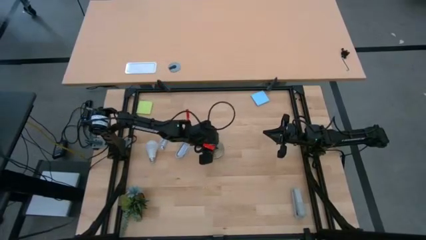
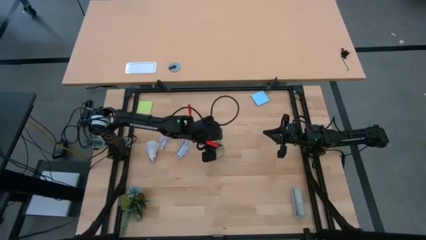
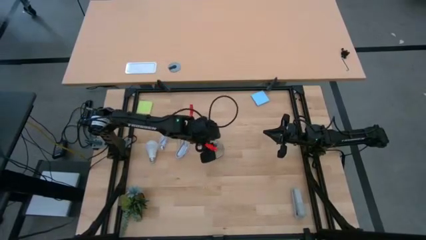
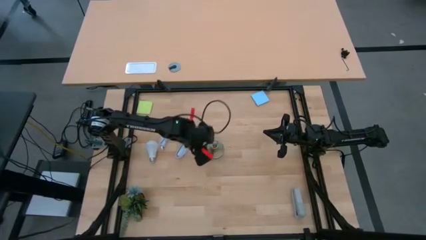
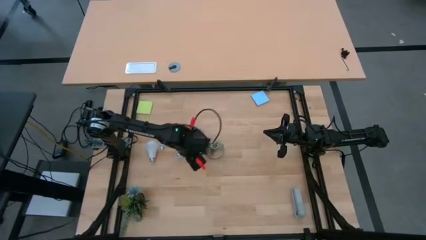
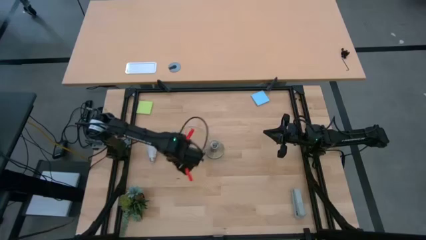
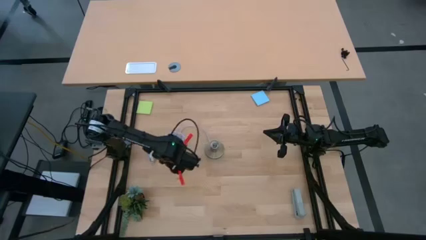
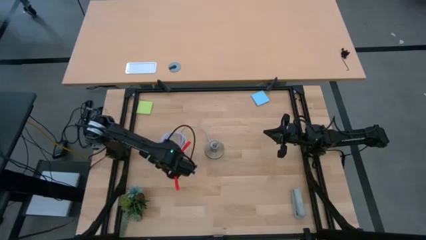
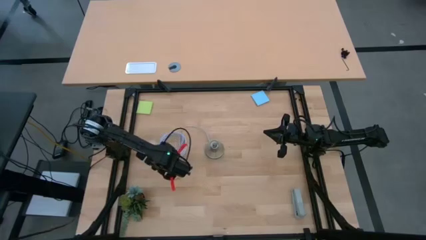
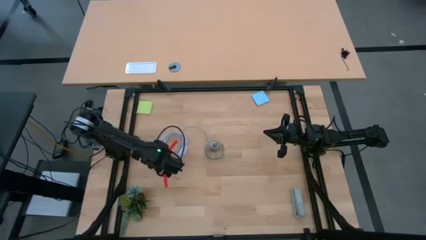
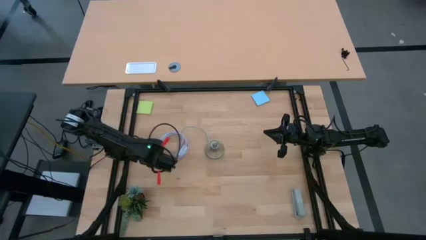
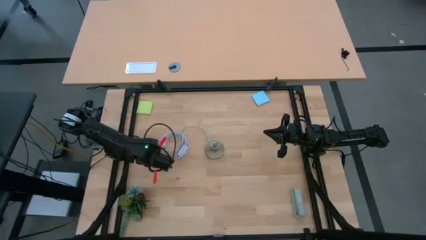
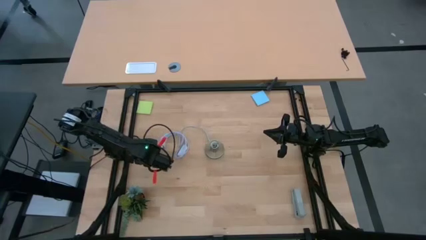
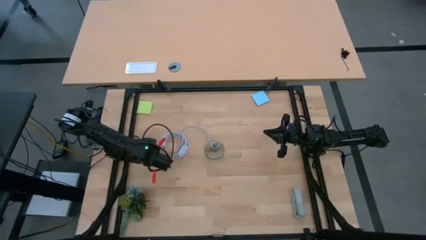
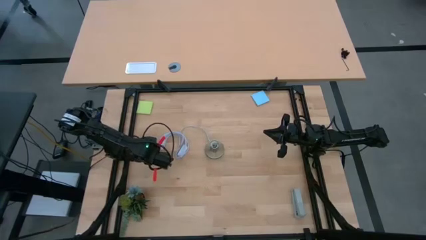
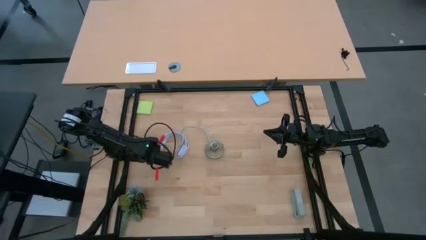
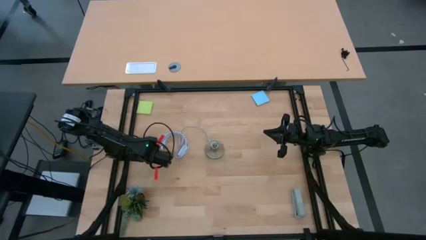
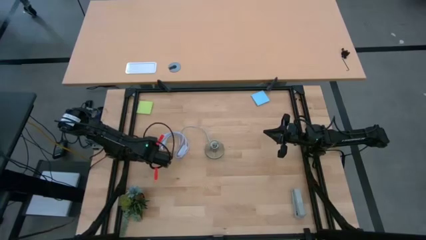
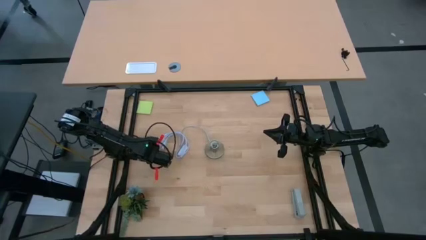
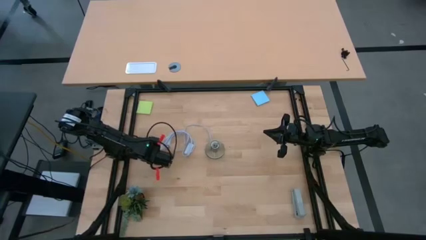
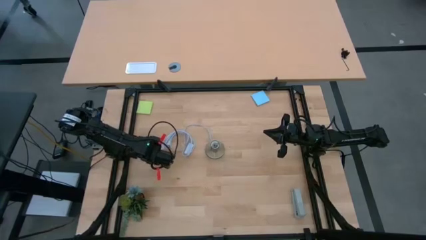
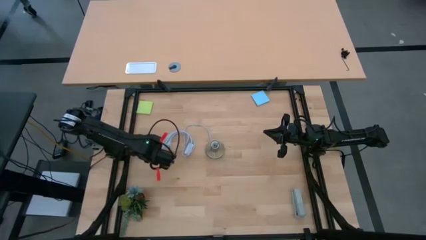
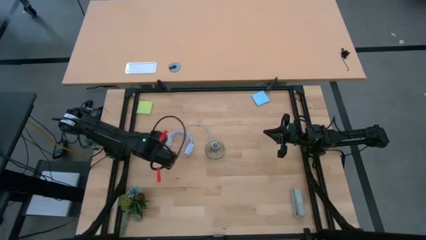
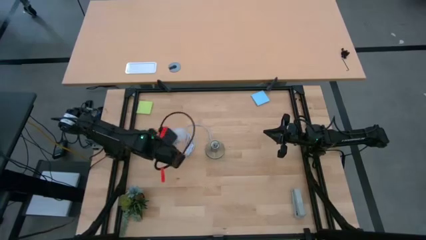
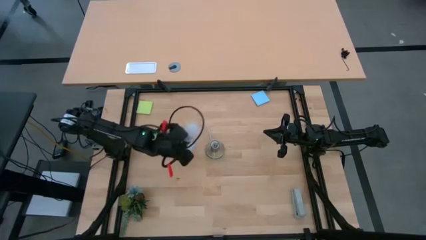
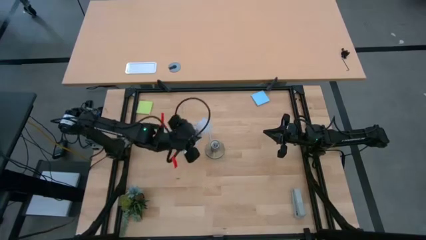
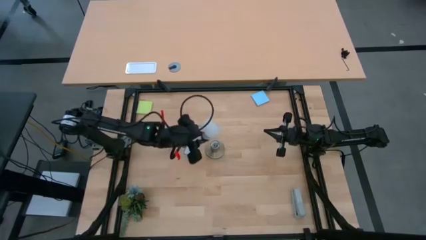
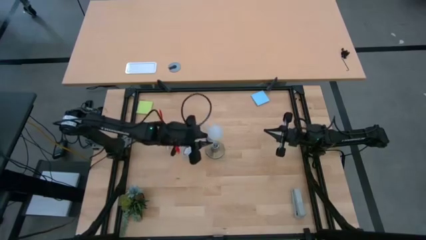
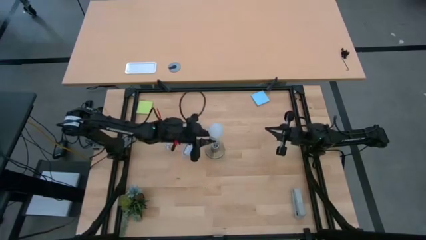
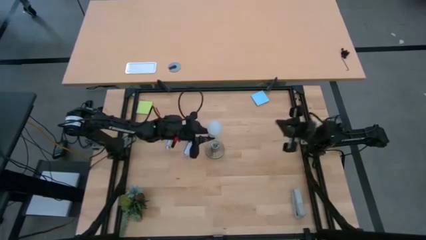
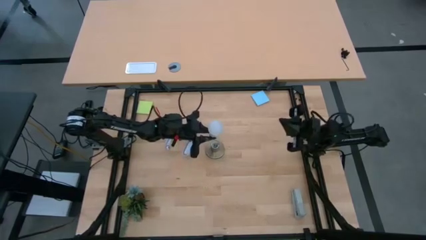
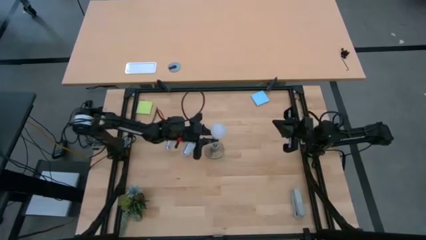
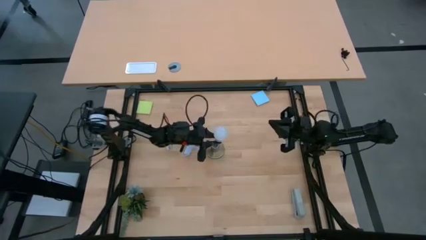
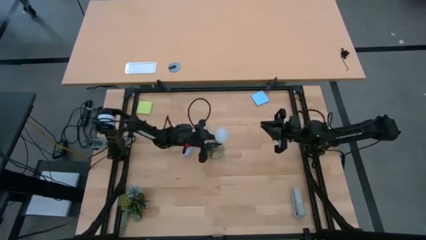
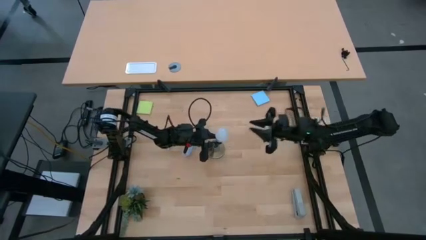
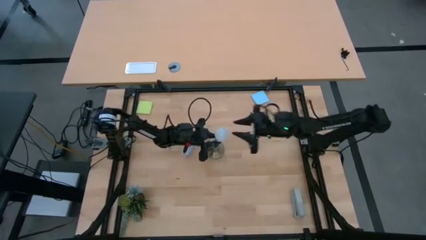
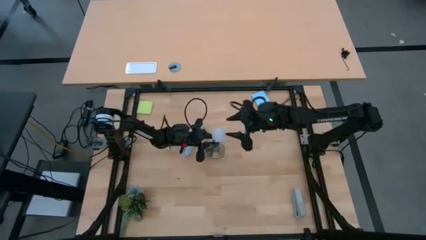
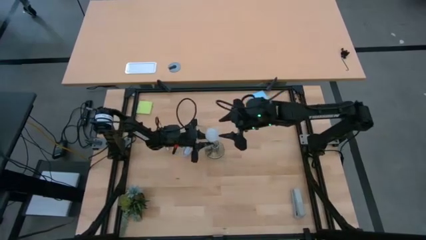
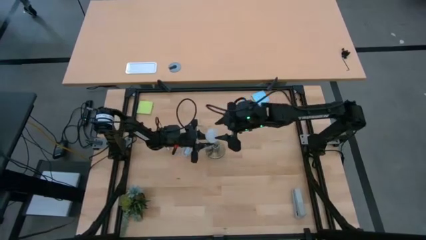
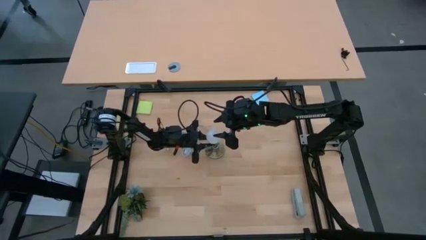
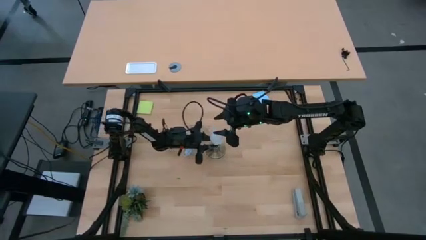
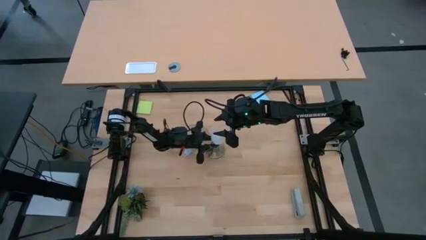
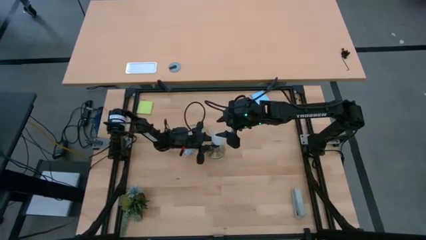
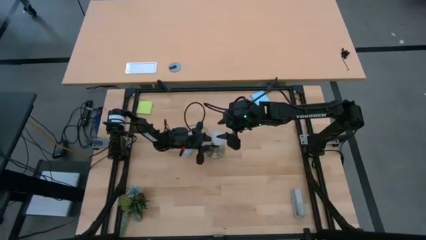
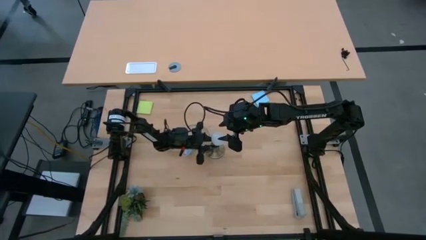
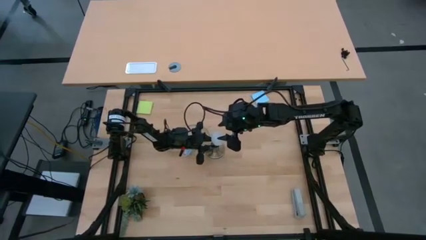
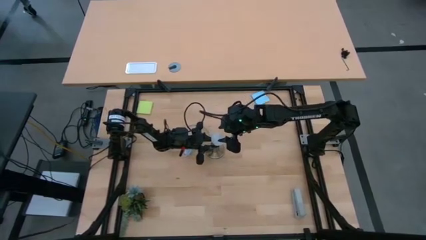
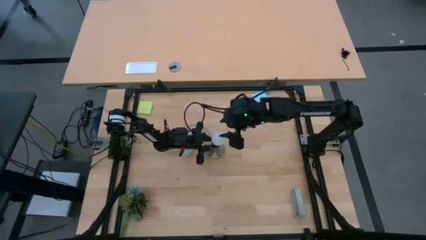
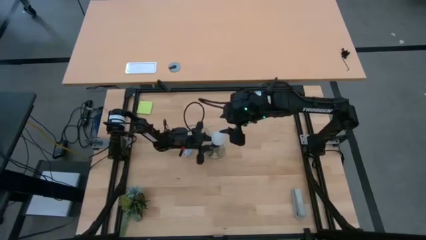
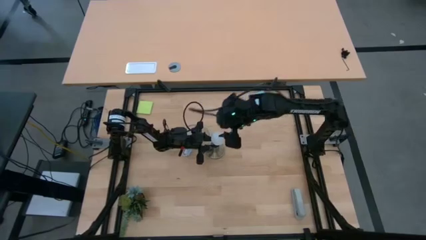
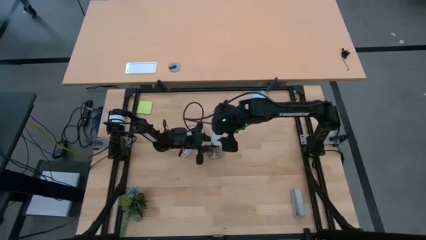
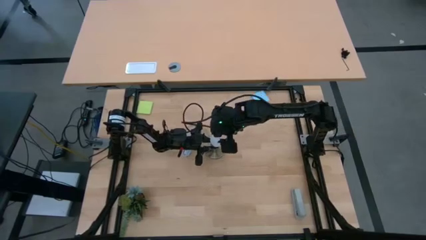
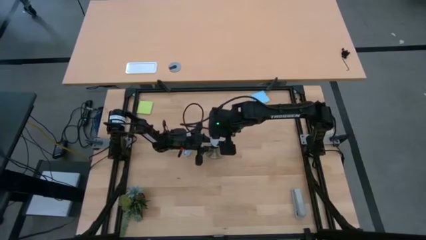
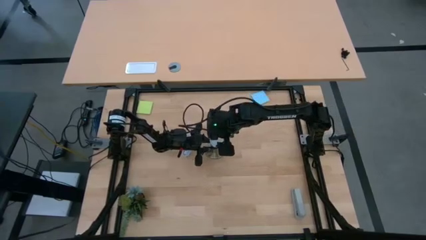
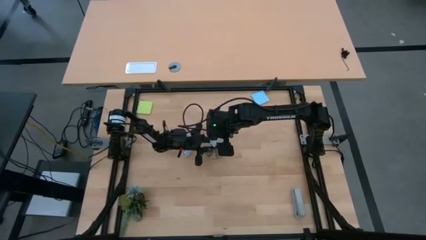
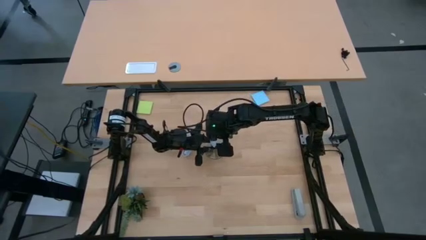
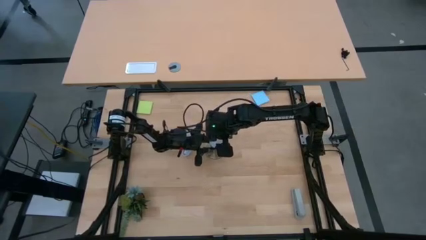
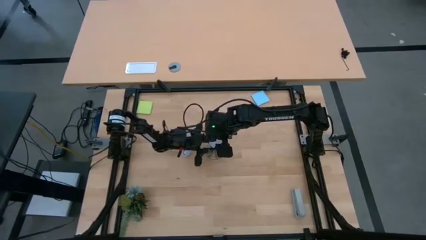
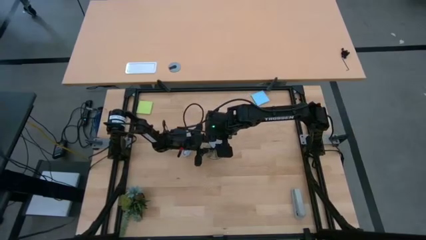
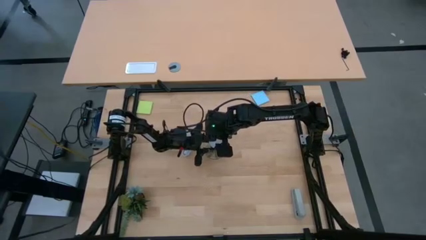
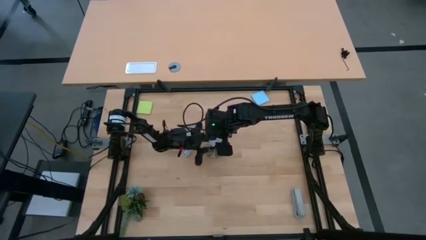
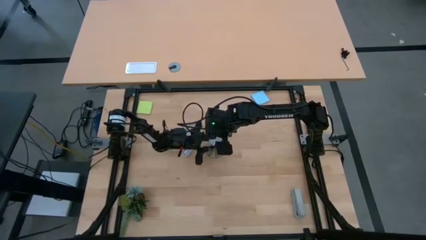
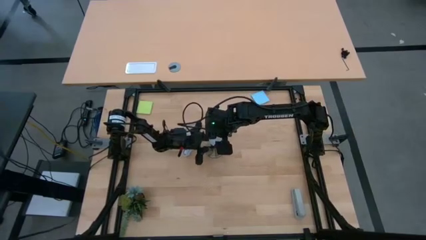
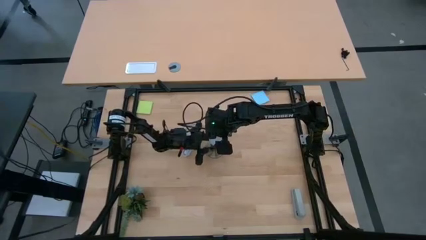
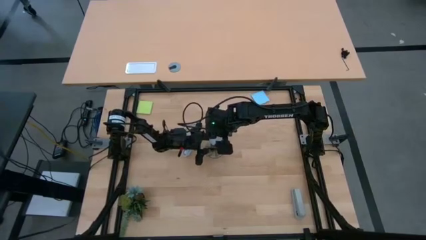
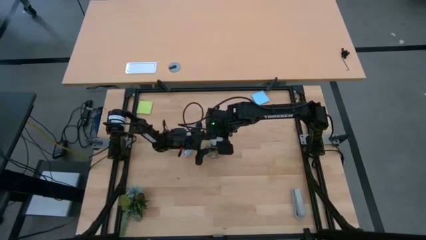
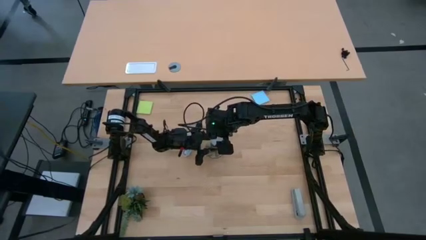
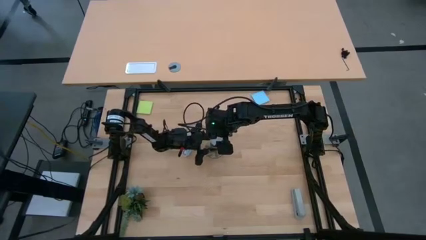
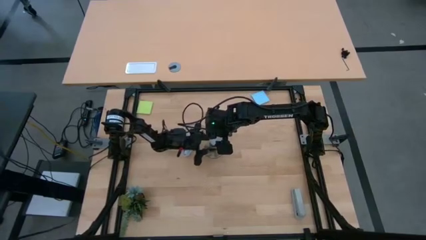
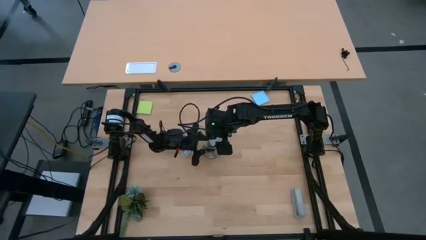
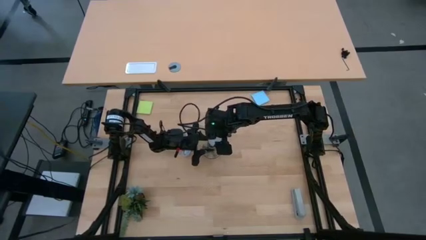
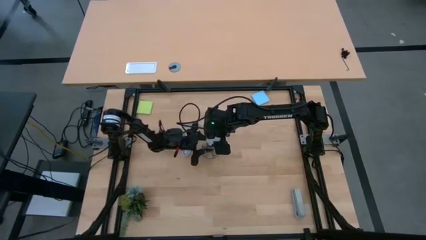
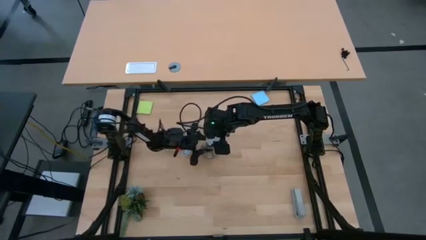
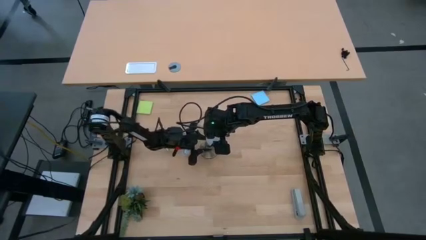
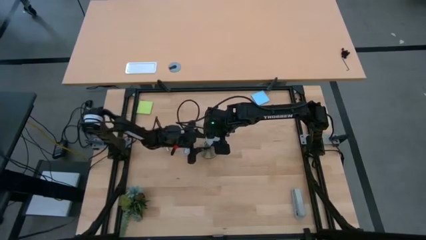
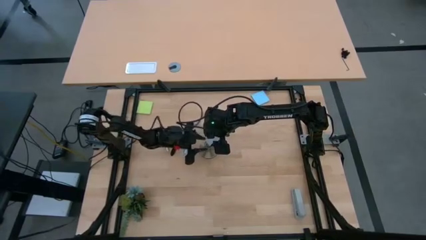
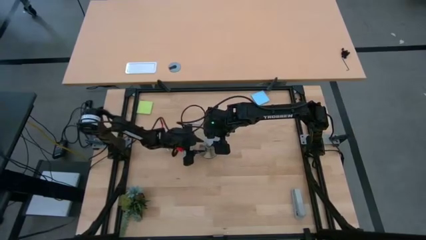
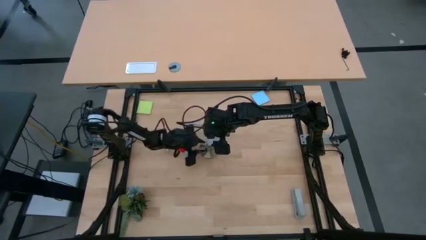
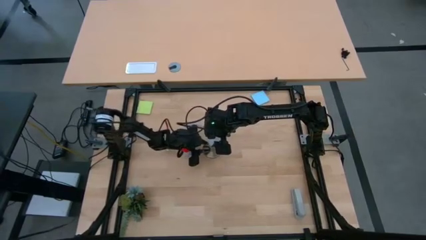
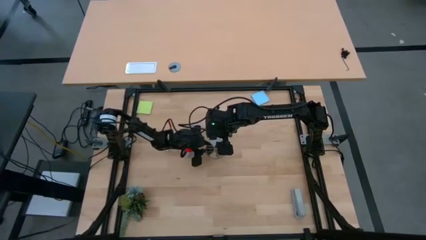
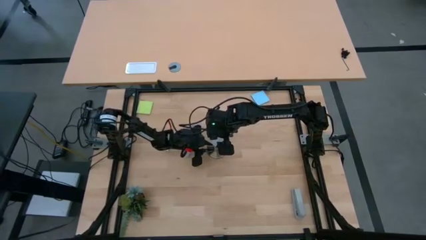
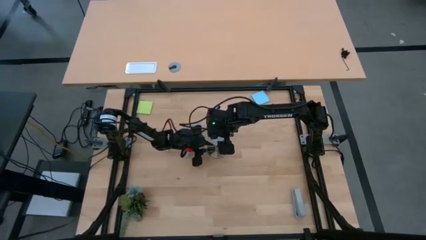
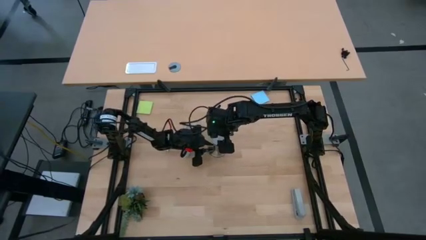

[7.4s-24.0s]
Task: Screw lightbulb
Insert the light bulb into the lamp
